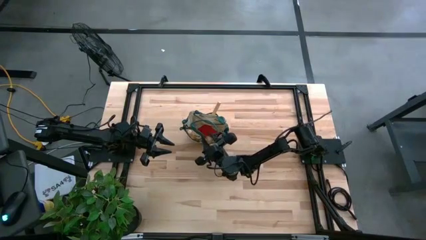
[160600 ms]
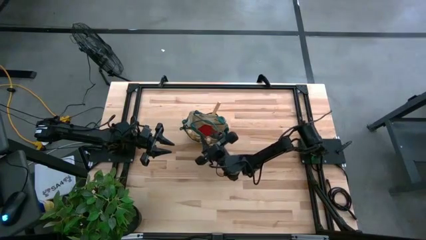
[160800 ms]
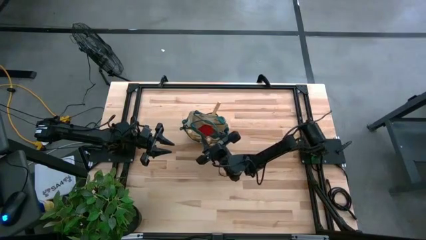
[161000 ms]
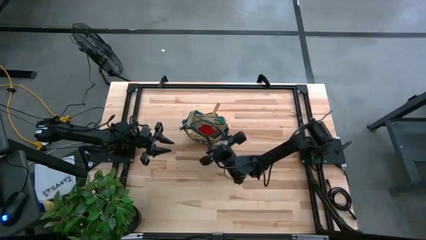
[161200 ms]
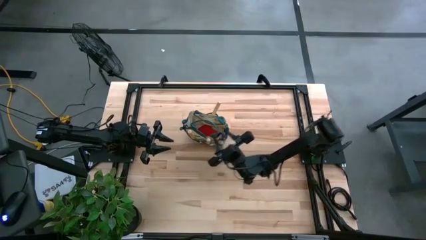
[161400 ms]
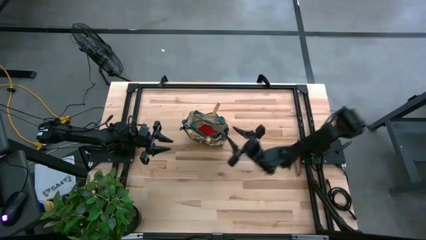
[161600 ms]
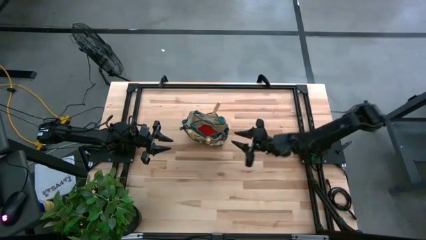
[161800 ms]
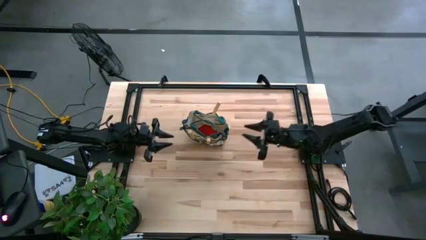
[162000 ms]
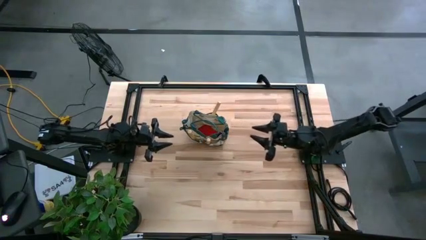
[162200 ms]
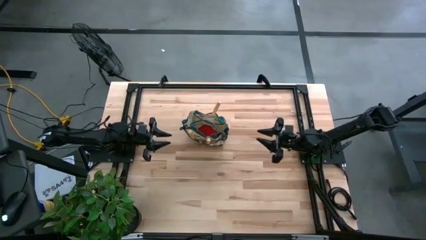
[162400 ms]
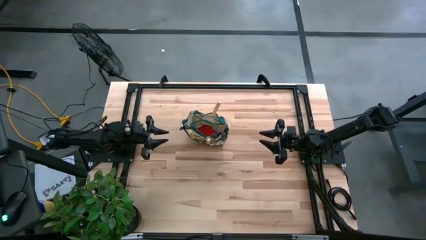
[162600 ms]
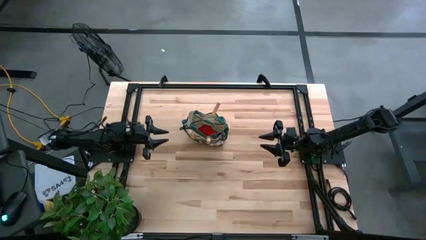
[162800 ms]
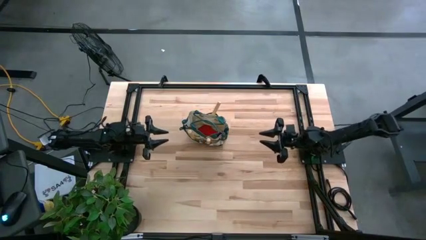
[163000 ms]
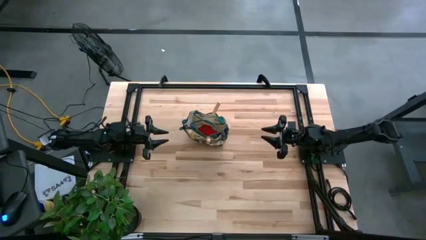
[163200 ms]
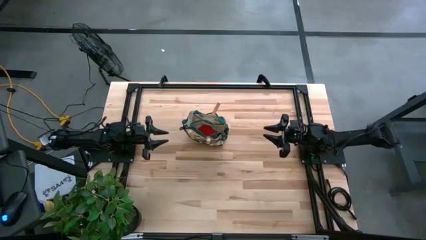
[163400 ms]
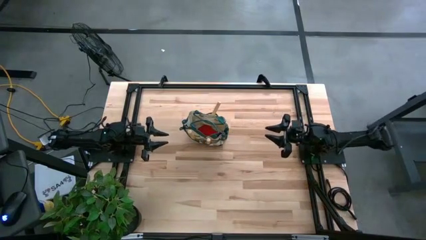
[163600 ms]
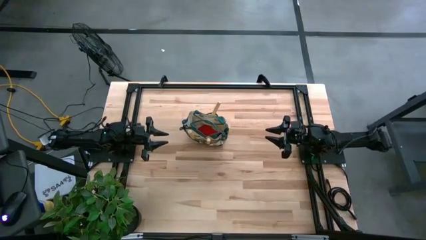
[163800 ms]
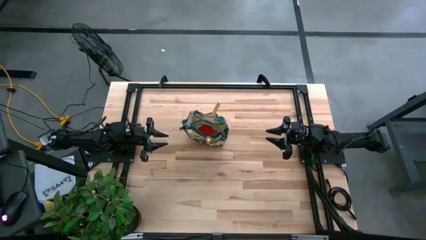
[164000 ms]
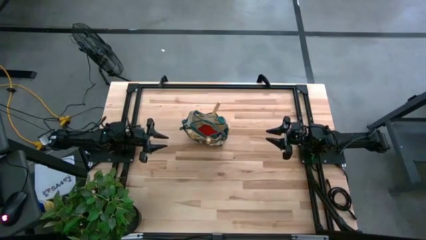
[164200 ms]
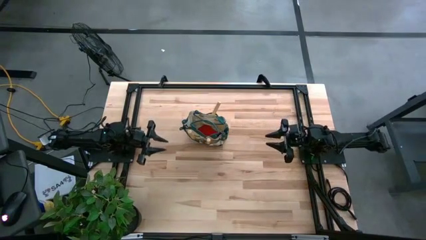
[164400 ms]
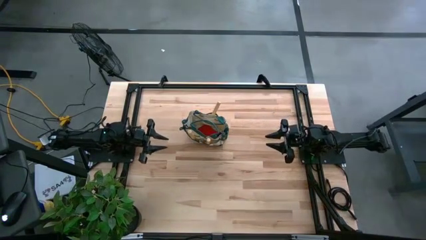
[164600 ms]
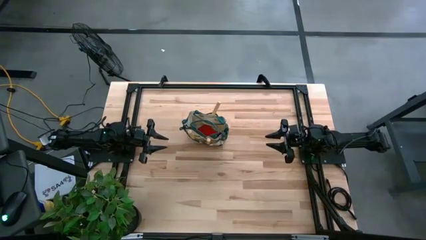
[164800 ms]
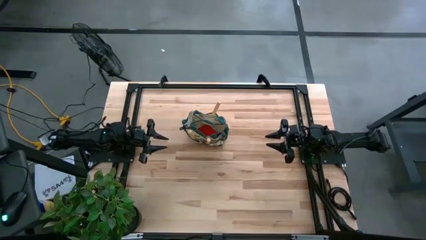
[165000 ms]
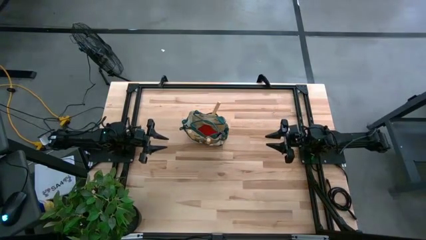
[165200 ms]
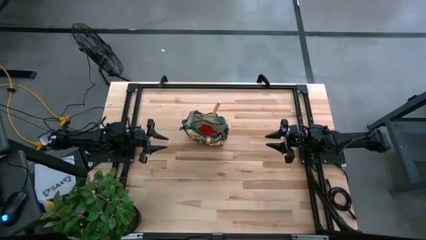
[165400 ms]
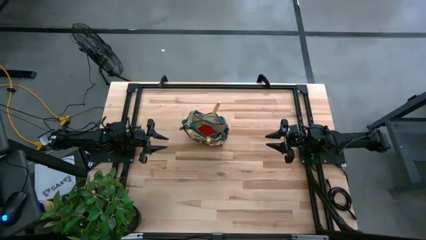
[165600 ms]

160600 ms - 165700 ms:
Task: Pick & Place Garden tools in Gardening bag
Return to Home Position

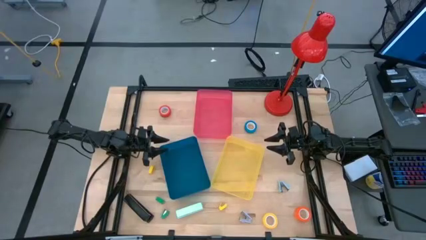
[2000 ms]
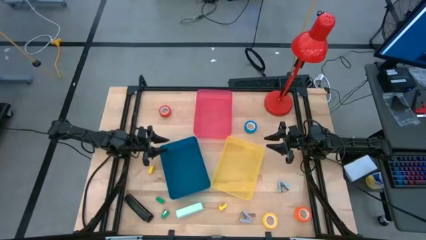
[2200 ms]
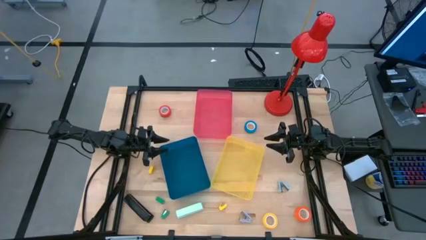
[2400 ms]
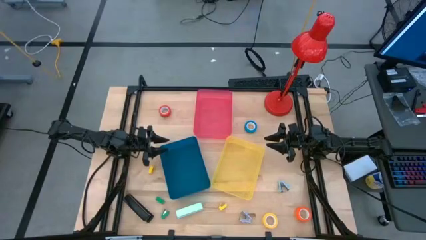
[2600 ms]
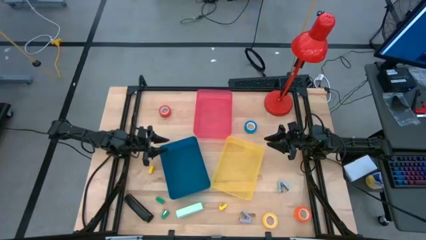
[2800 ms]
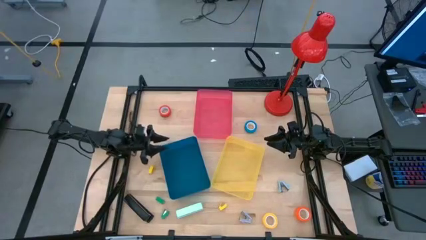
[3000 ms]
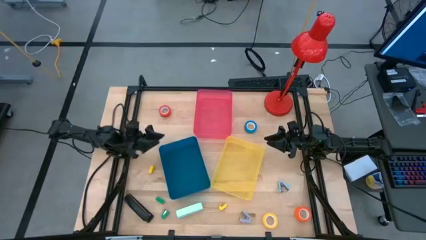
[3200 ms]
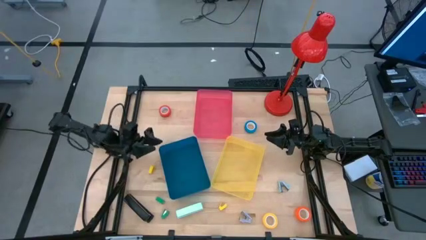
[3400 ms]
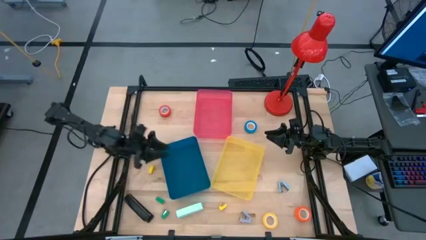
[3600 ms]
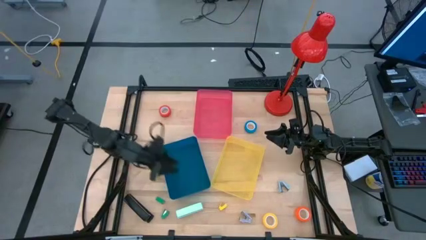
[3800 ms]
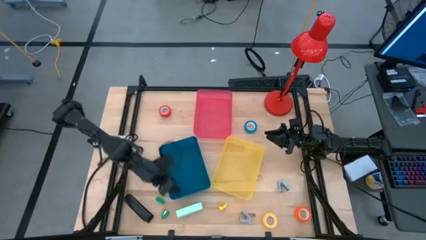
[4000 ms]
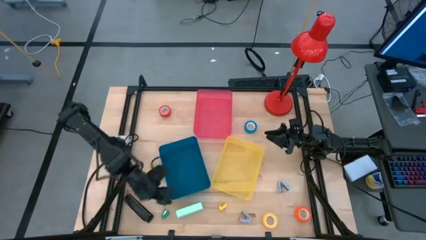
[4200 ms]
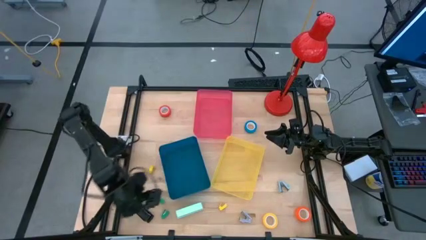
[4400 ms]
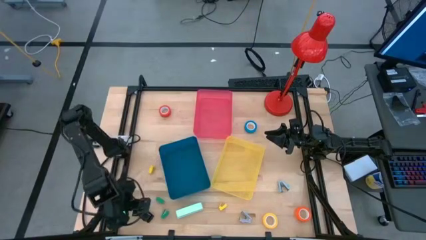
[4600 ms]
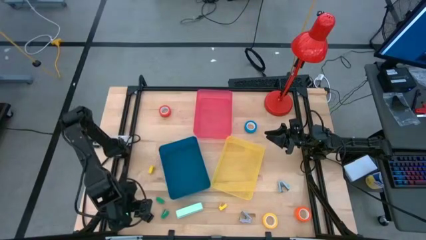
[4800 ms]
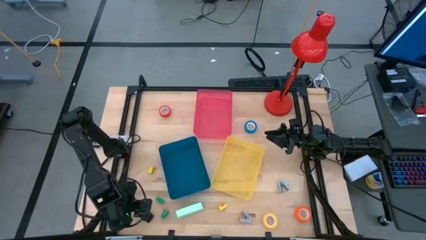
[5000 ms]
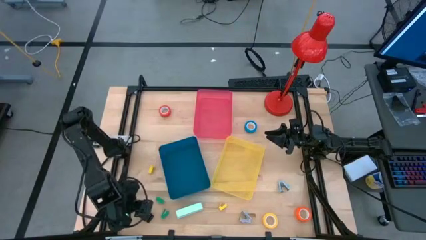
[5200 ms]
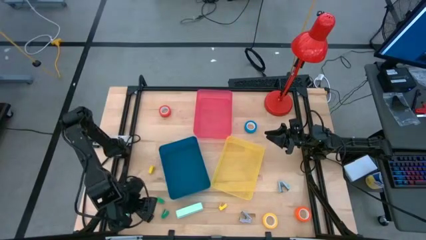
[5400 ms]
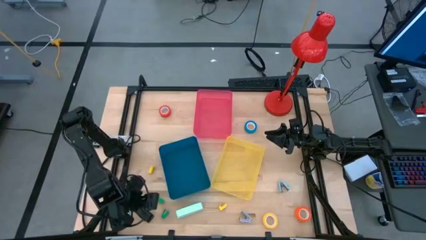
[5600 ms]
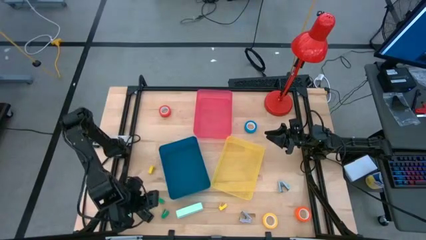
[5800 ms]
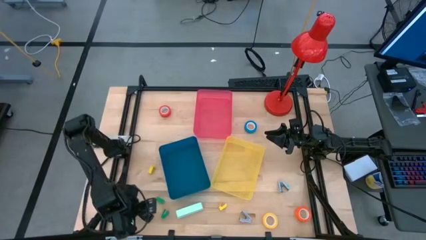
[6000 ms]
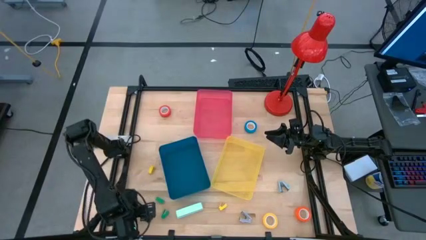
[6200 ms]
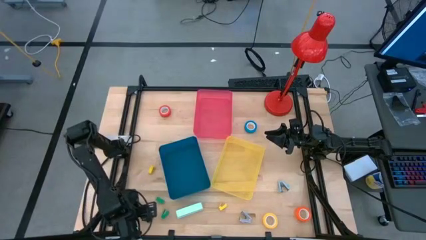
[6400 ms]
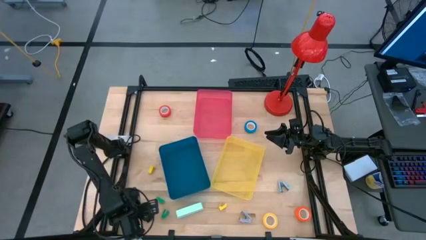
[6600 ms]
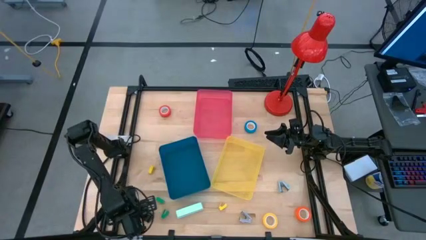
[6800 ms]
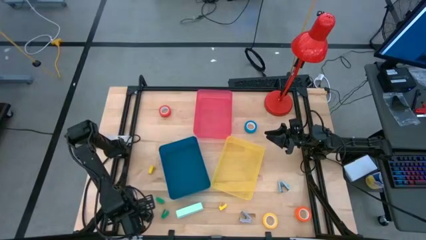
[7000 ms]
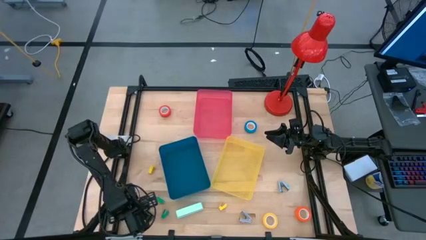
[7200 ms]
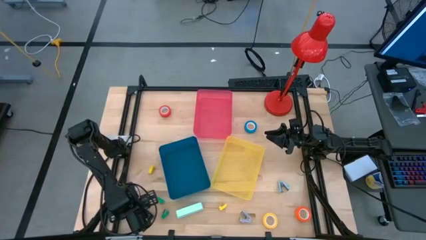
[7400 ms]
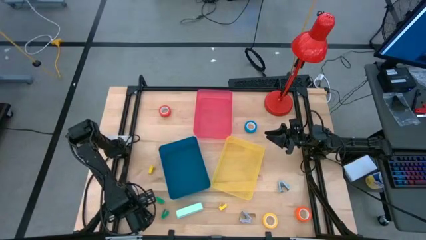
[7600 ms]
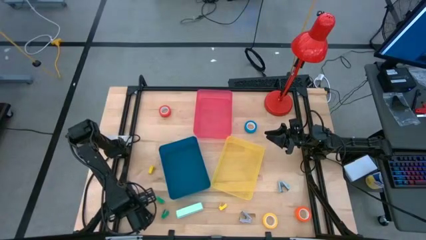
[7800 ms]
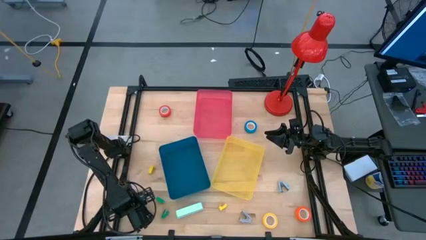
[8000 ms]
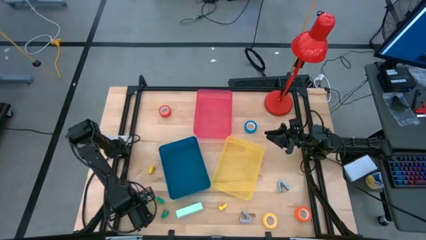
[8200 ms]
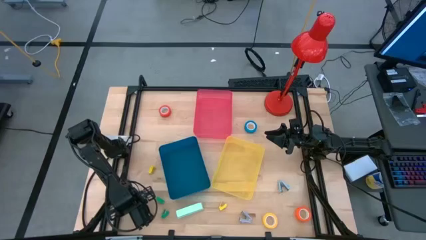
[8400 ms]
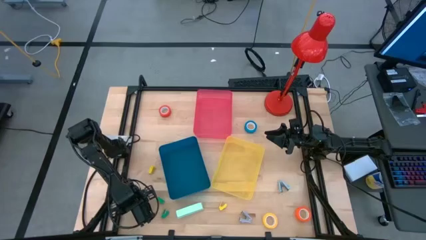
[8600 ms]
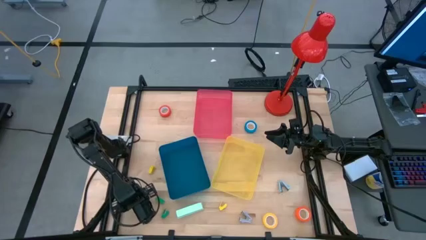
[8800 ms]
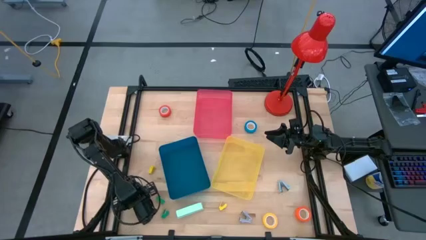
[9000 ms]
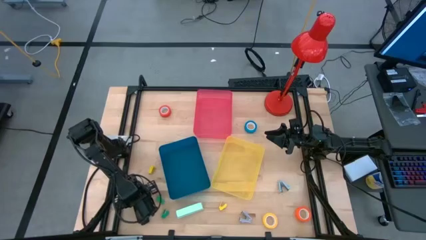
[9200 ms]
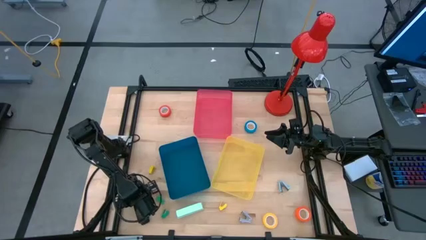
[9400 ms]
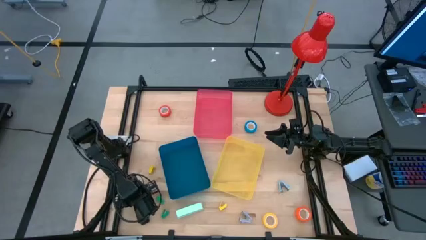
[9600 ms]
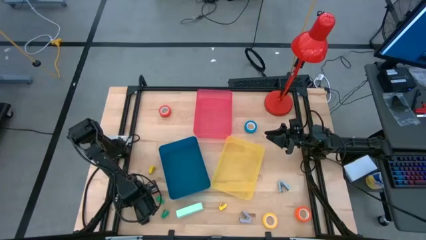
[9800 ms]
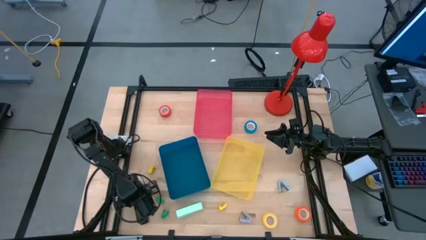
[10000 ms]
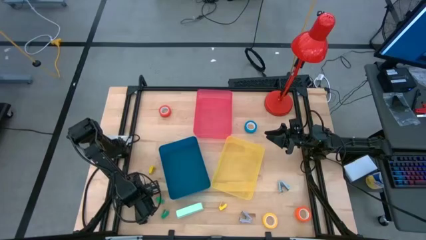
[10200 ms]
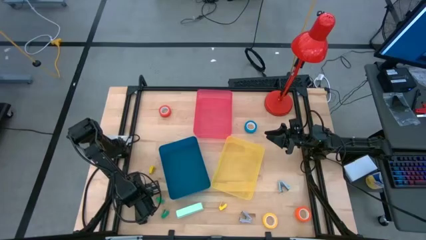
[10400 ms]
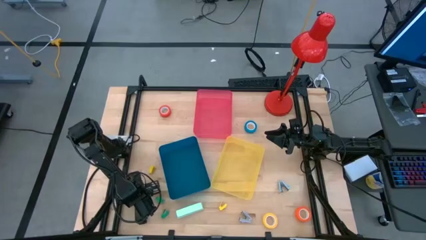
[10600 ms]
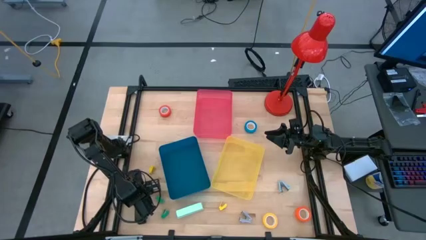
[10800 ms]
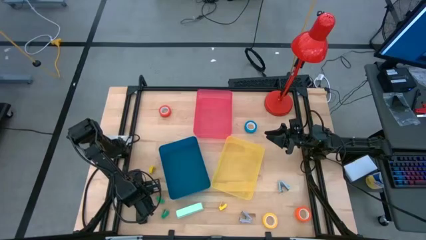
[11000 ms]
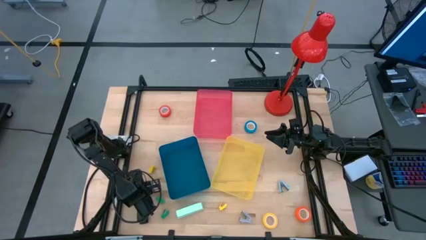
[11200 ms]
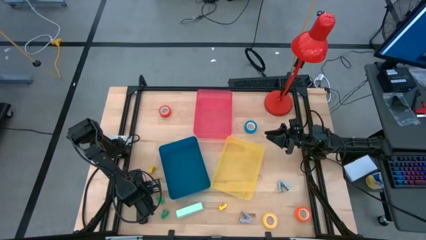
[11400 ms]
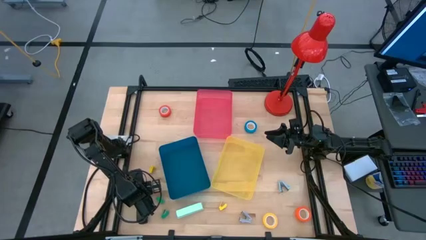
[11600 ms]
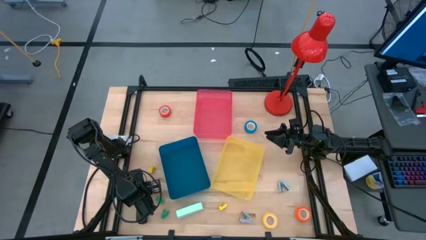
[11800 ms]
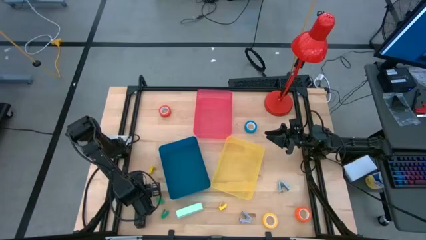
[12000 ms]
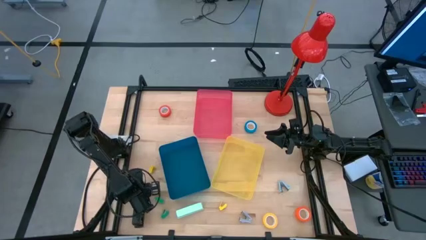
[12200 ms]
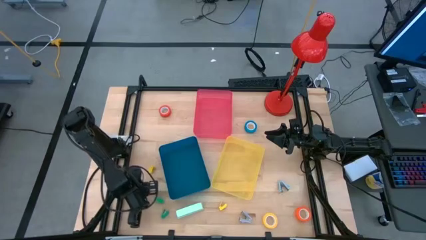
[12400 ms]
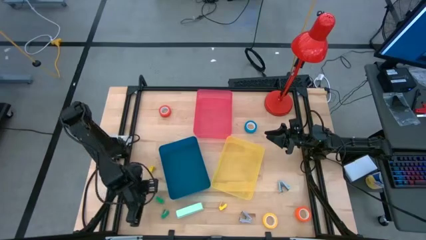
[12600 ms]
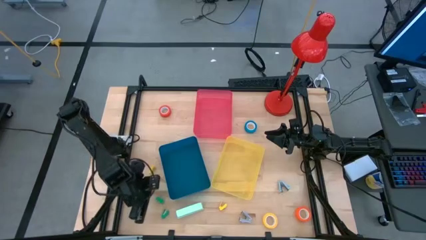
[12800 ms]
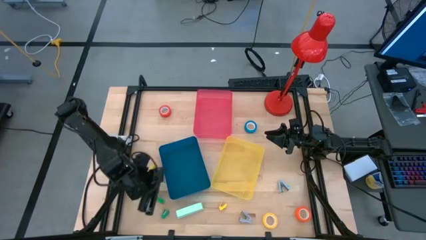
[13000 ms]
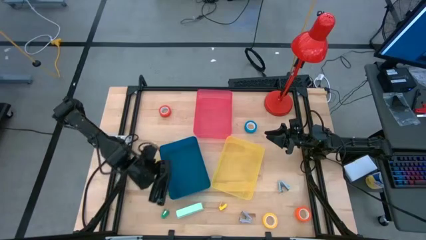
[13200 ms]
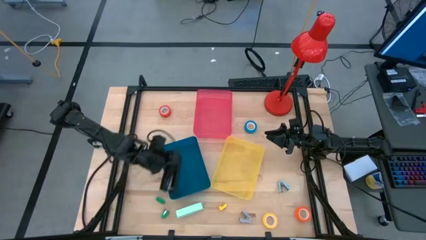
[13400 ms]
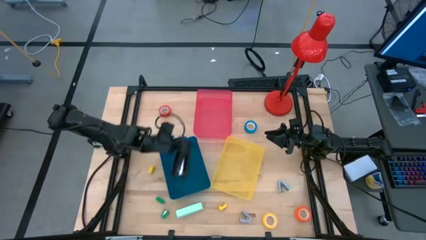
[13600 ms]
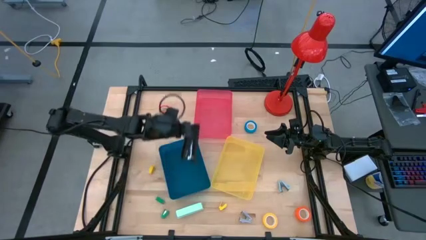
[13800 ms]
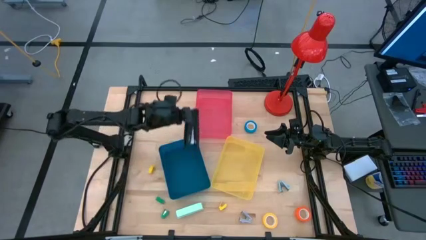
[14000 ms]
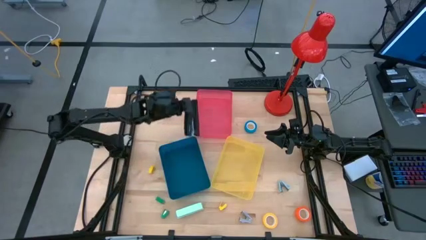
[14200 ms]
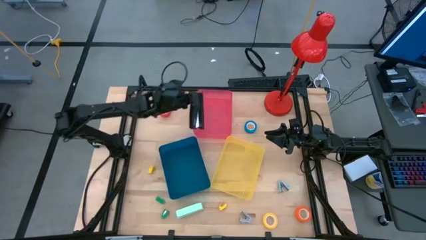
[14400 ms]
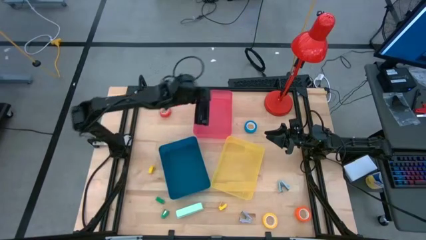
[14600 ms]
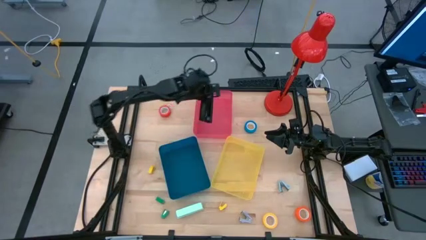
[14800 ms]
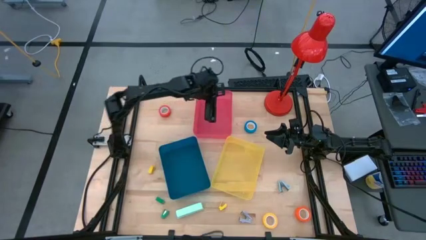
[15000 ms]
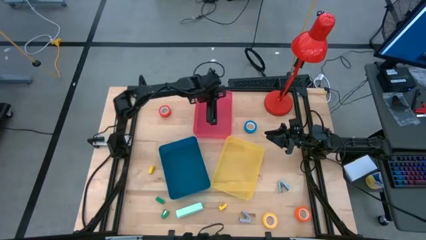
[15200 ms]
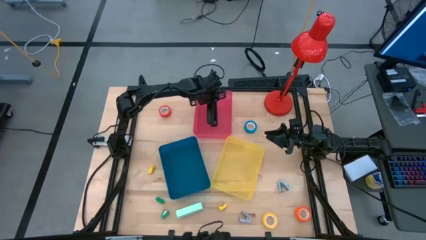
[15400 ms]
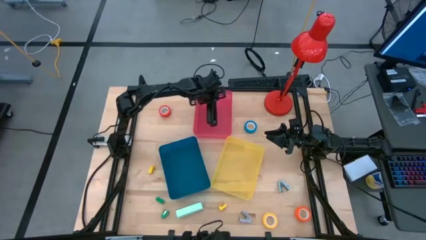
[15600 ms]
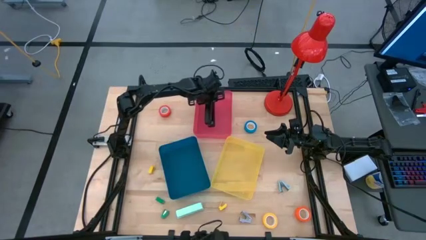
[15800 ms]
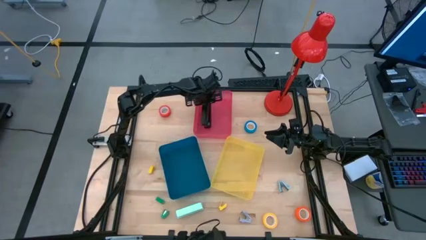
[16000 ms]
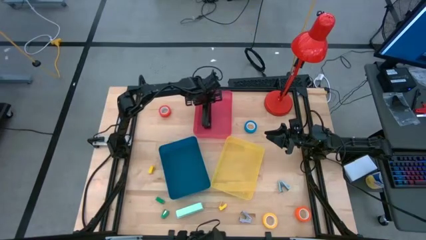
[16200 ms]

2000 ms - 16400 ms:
Task: Pick and place Stapler, Stapler remover, tape
Put the big black stapler into the red bin
